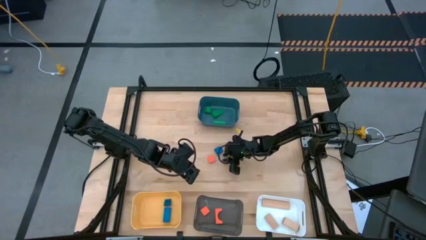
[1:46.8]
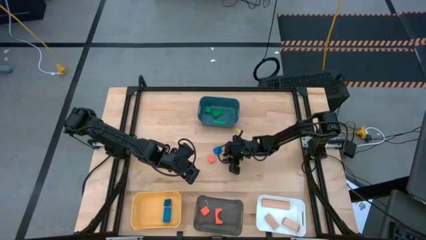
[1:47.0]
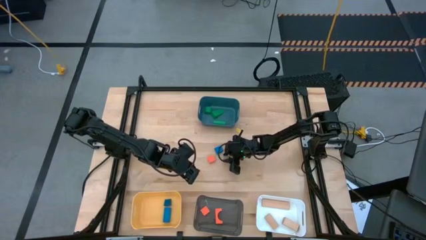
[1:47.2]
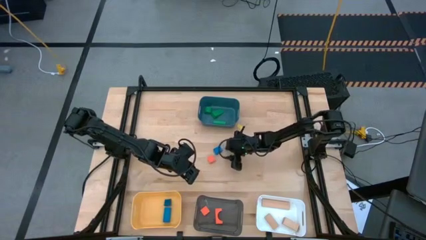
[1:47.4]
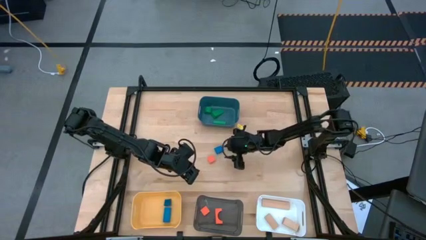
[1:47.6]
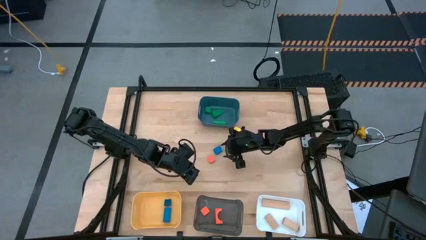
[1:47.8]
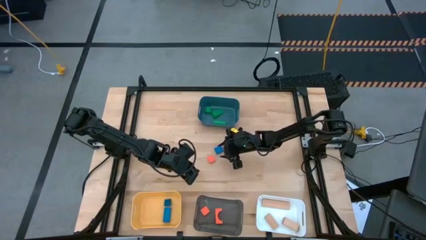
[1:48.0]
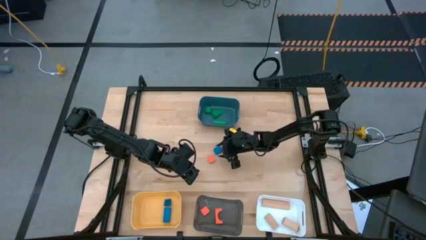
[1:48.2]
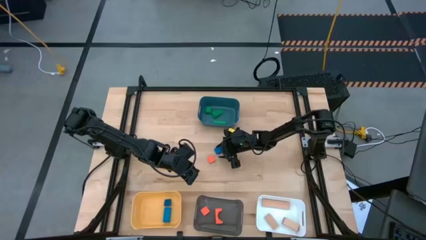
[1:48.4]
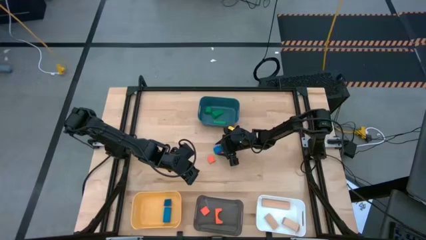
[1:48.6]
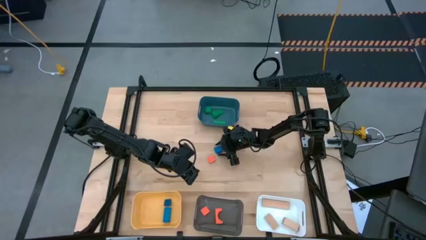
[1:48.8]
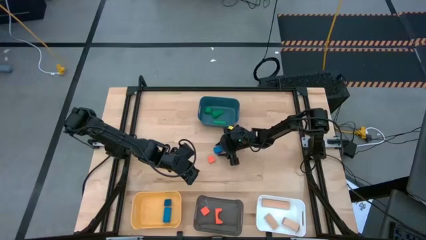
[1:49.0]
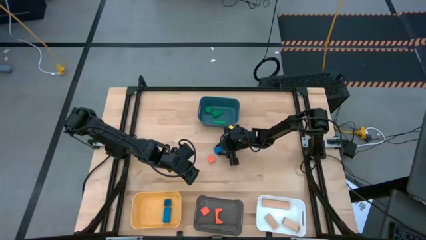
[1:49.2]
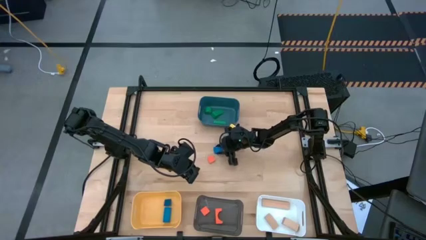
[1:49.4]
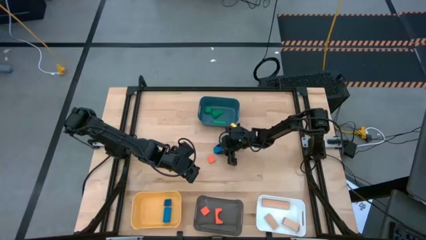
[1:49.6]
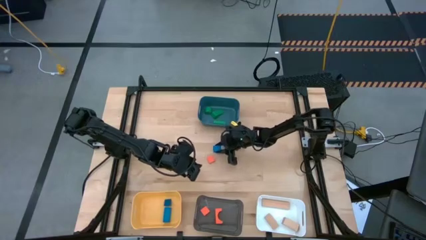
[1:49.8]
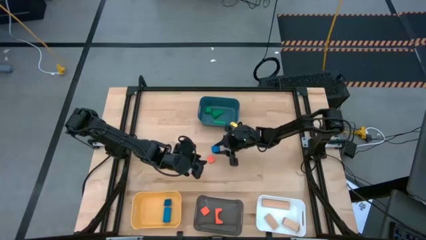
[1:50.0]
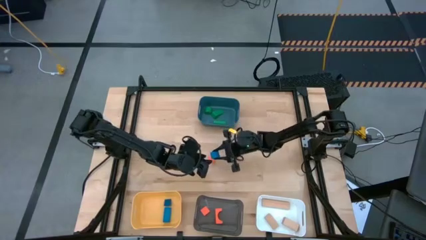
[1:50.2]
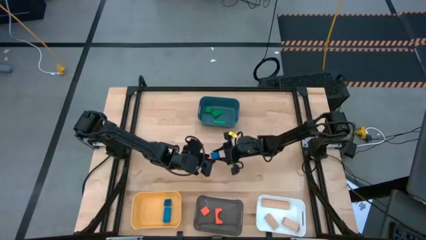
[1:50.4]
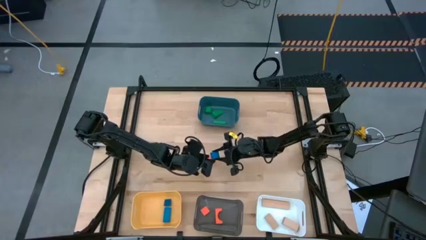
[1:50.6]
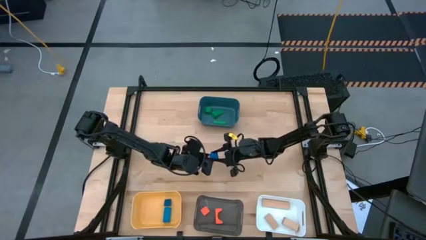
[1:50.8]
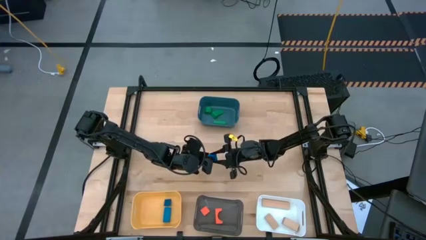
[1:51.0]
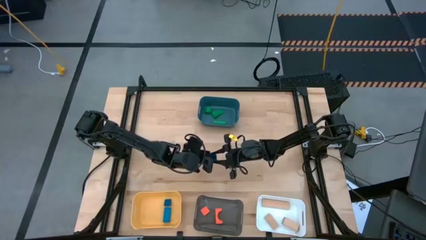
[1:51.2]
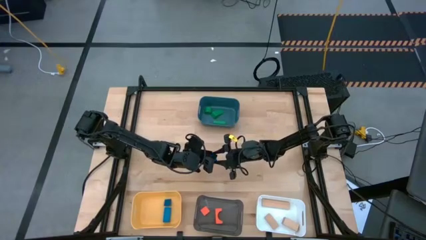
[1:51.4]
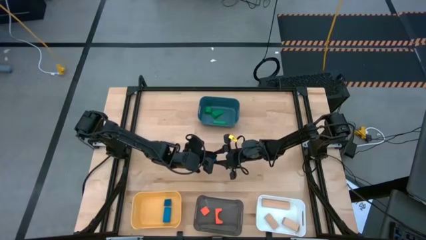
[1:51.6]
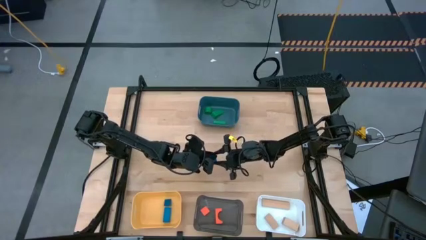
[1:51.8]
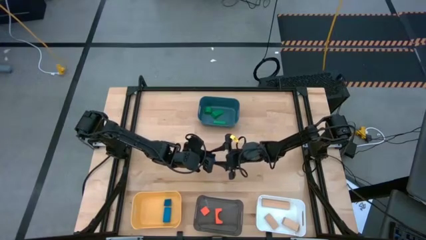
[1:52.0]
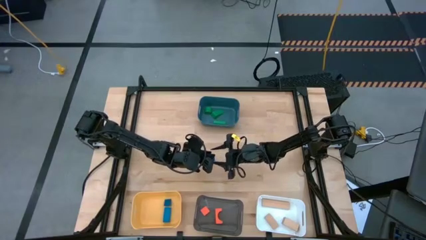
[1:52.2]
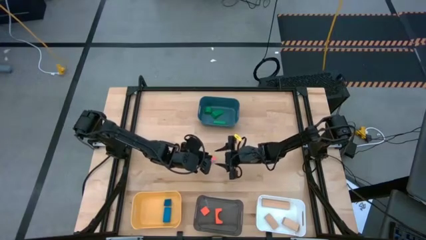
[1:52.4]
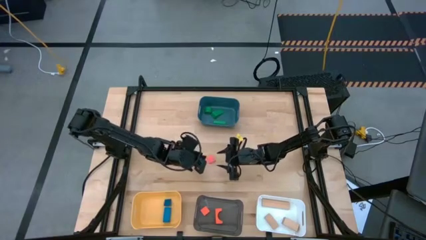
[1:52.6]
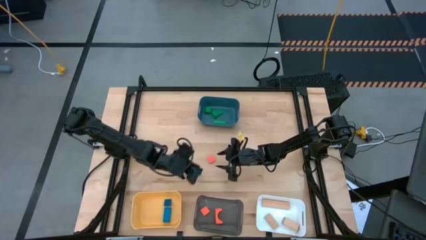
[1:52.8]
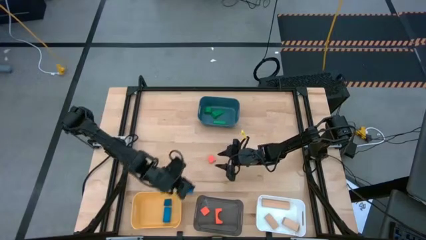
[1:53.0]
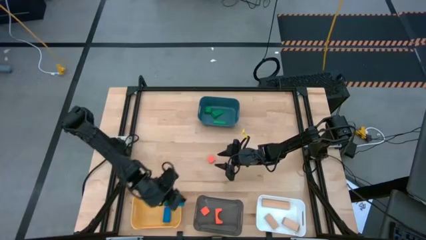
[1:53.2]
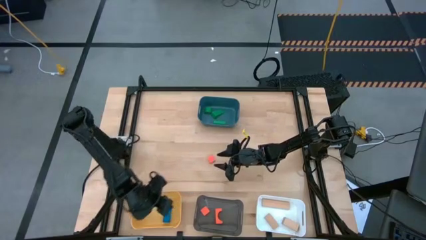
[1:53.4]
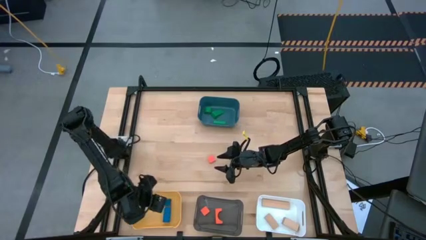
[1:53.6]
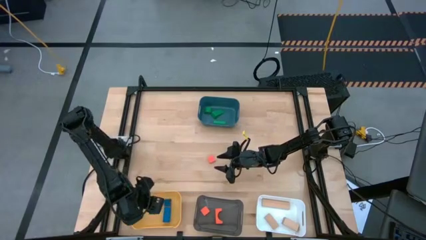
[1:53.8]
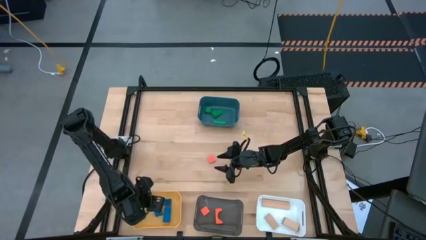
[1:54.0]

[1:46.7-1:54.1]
Task: Sort & place blocks by color
Put the blue block into the yellow bin

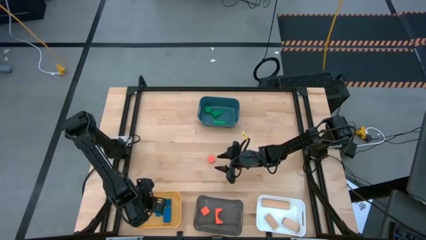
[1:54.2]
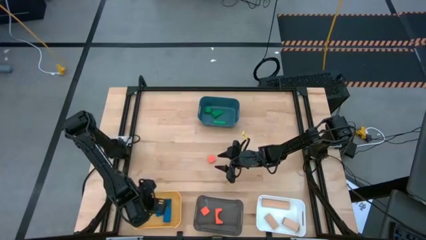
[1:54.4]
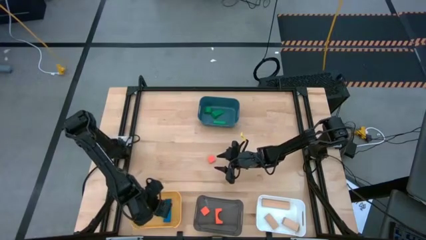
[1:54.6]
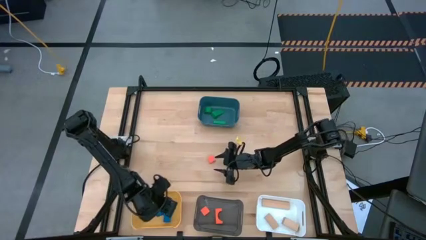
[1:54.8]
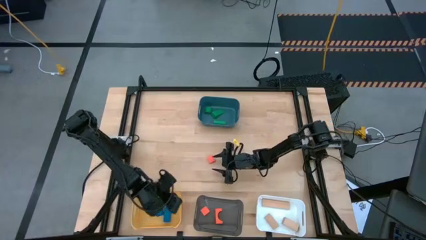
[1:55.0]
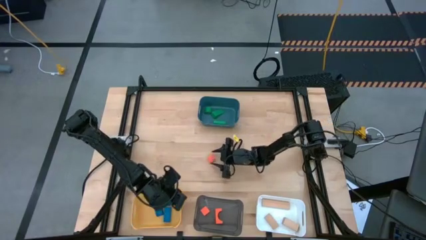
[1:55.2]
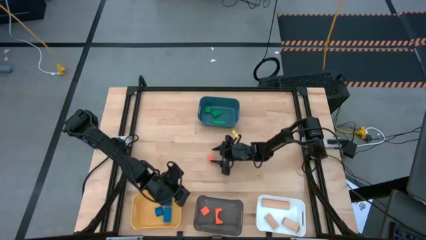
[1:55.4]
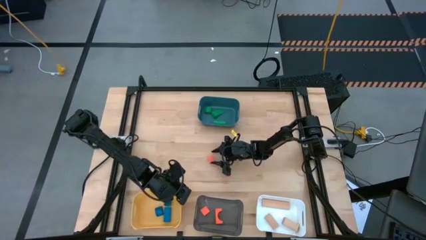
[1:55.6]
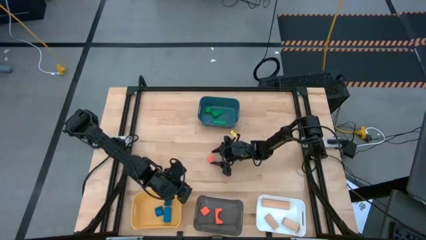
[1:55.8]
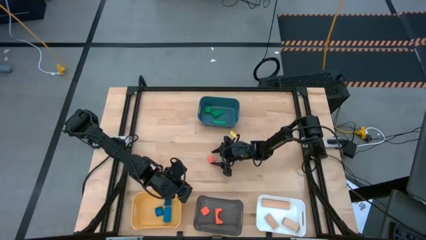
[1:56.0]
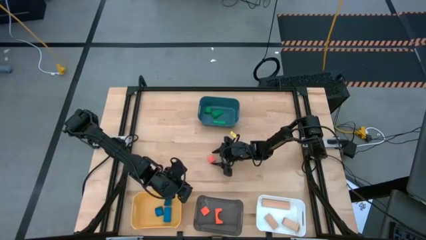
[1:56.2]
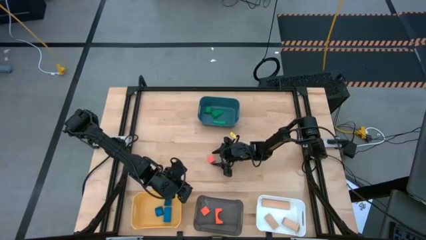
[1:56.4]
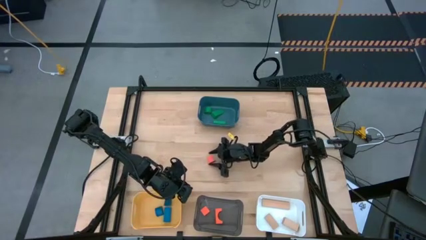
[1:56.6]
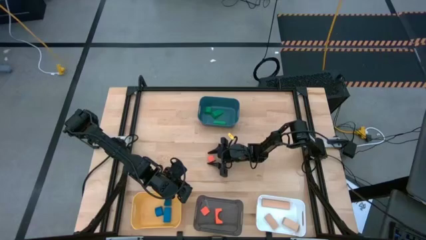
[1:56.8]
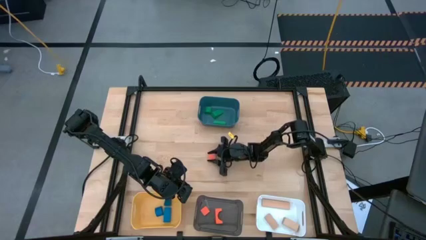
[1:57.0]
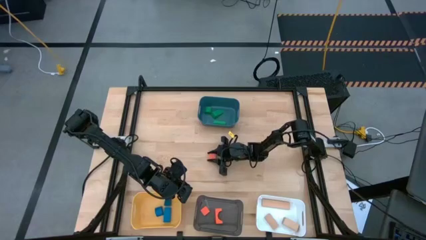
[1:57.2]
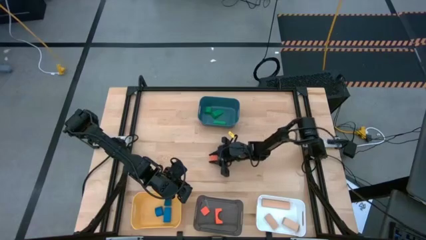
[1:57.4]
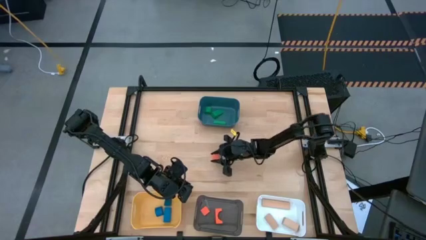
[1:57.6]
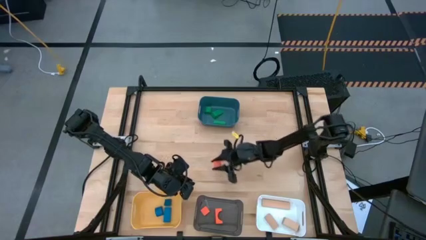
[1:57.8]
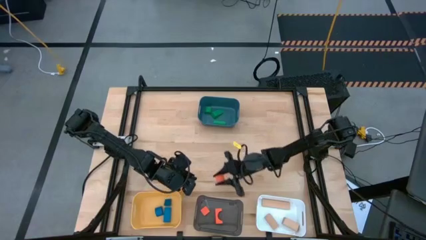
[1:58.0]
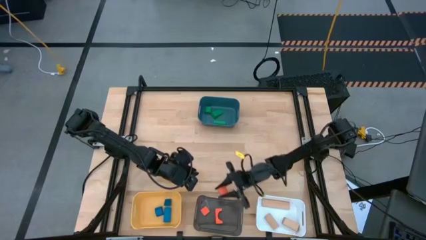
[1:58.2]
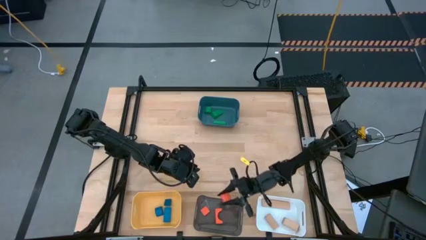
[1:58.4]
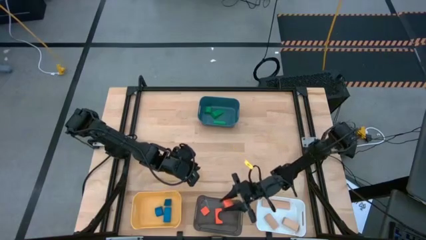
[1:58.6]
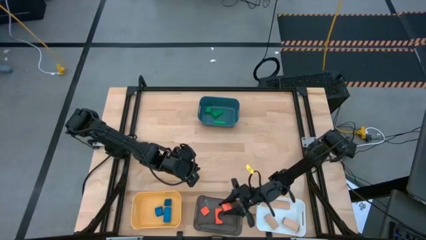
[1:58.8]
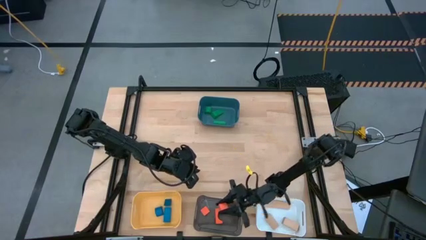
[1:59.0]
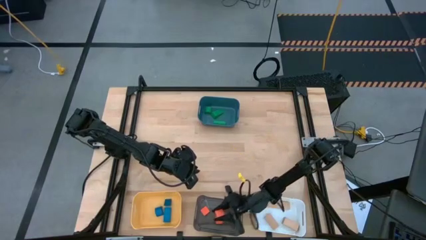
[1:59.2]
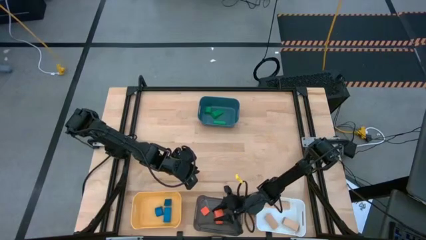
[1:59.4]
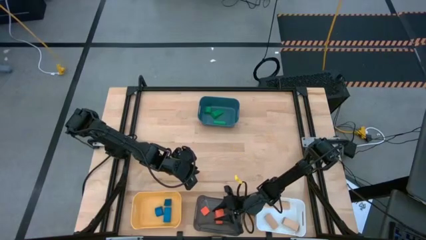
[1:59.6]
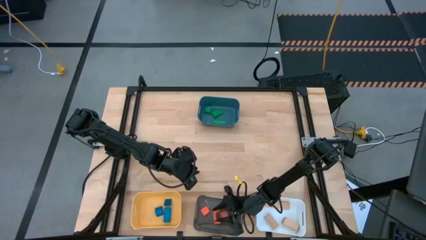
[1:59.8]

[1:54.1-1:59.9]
Put the orange block into the black bin

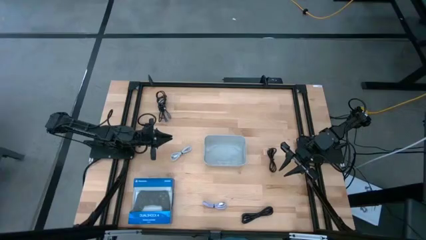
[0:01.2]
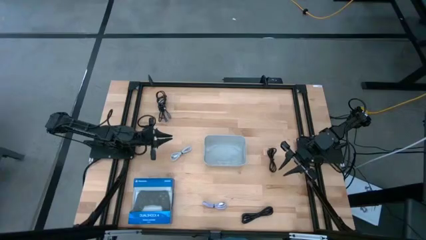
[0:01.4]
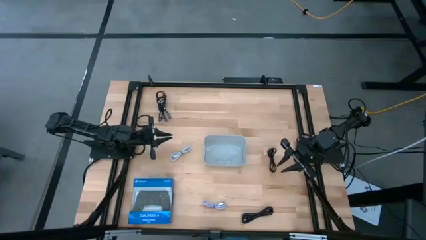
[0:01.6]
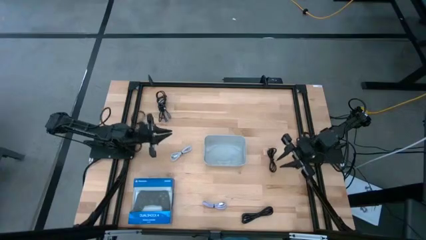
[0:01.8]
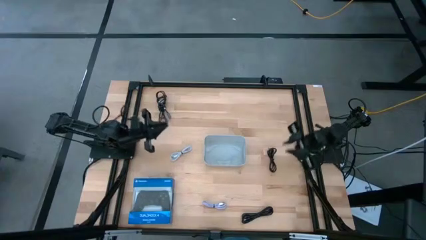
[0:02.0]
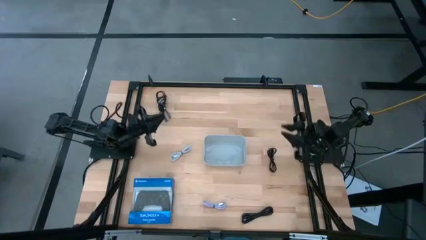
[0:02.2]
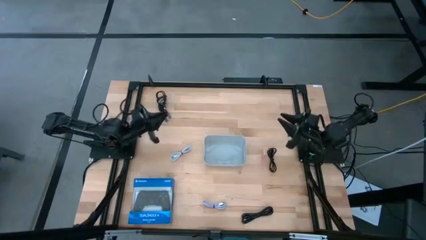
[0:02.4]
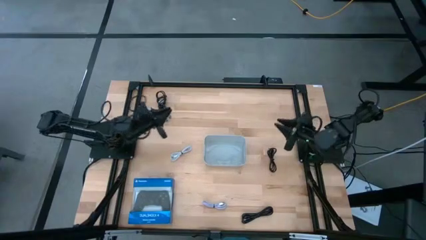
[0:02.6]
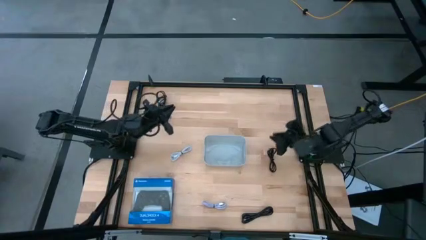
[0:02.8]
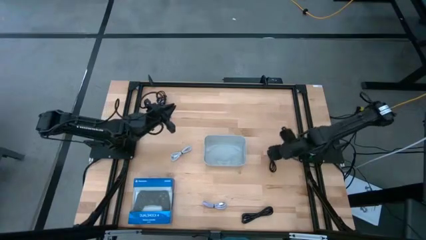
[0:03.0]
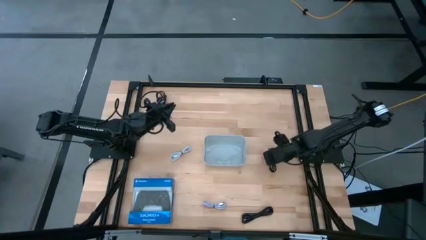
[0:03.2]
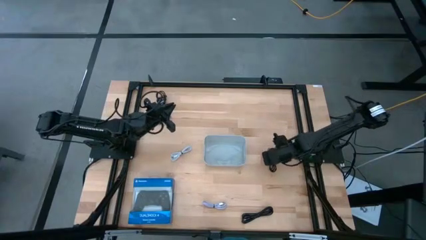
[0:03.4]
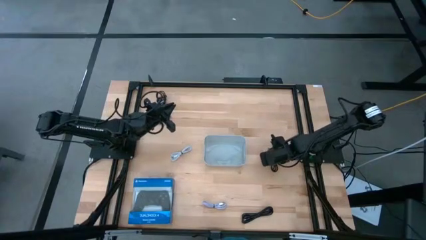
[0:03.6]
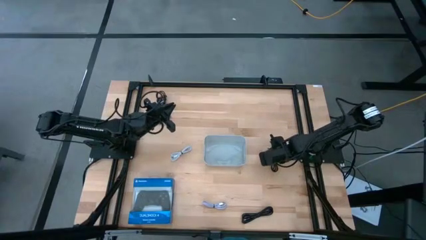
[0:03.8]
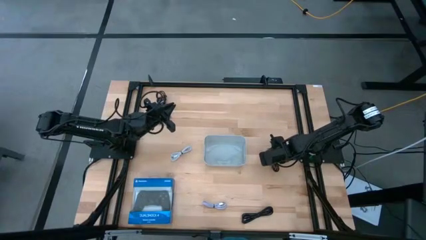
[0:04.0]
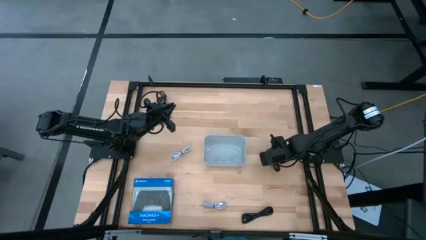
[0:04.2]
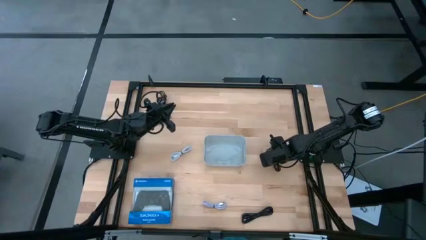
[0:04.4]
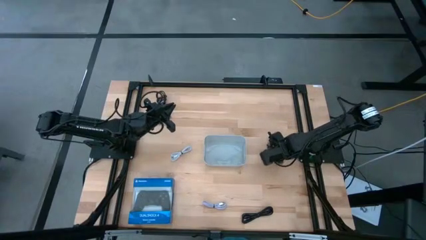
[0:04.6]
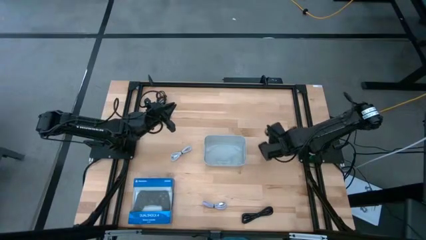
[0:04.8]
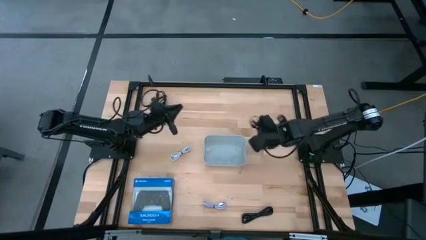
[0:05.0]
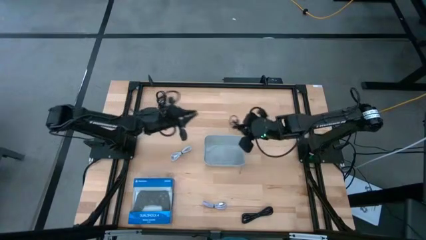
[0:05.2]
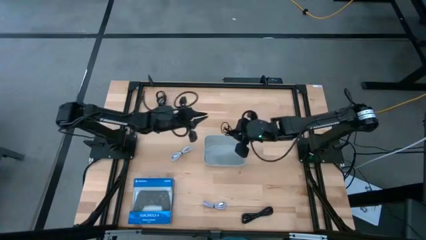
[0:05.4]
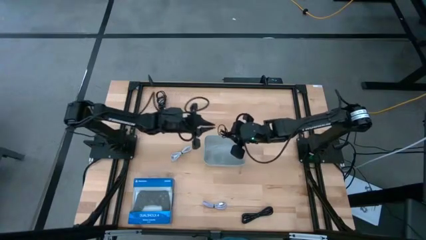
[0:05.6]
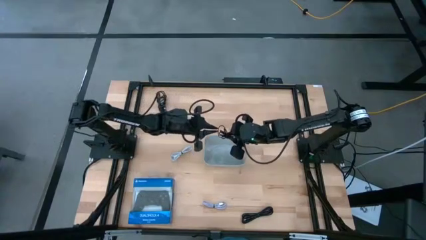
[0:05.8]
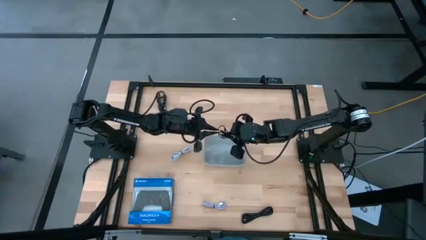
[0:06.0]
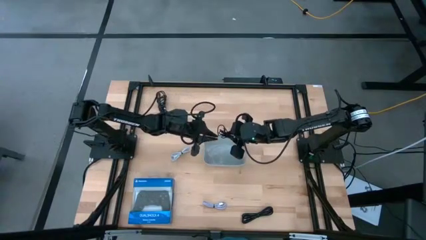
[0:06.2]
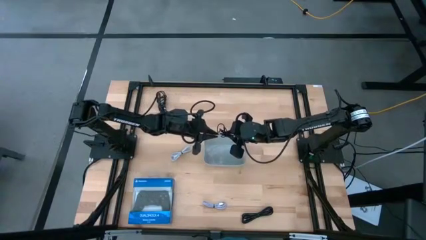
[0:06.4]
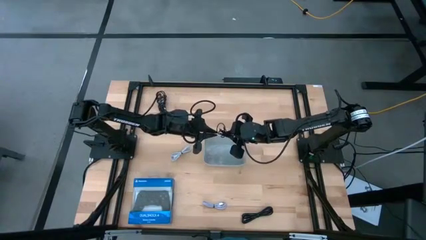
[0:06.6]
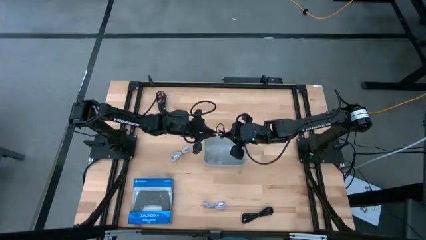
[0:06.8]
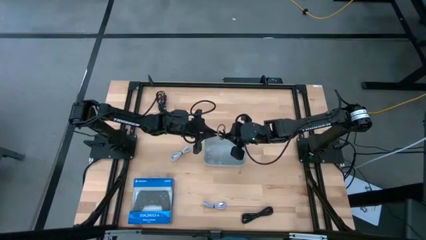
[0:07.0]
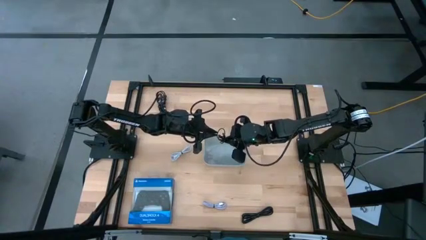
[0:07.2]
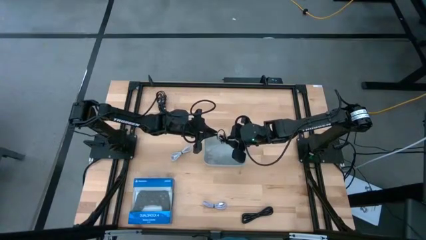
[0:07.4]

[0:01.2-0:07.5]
Task: Pick and place USB-C Cables
Put the top charger cable into the gray bin
